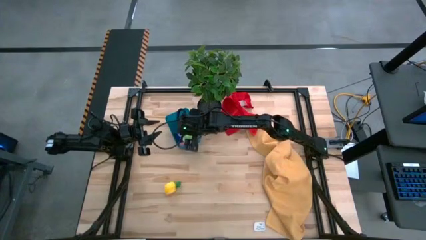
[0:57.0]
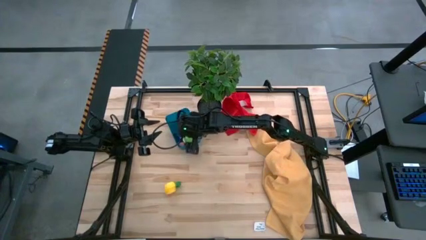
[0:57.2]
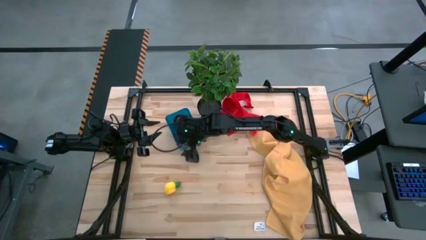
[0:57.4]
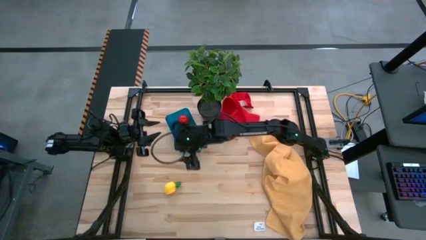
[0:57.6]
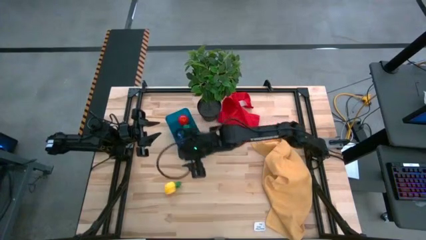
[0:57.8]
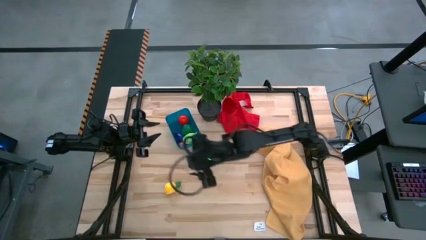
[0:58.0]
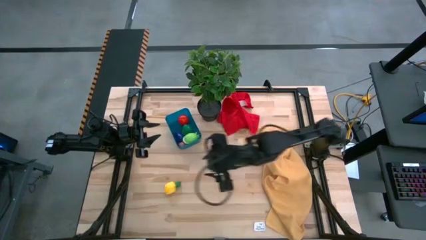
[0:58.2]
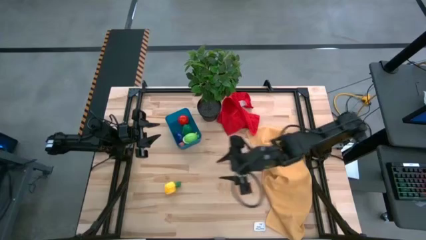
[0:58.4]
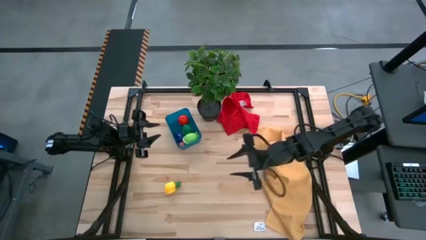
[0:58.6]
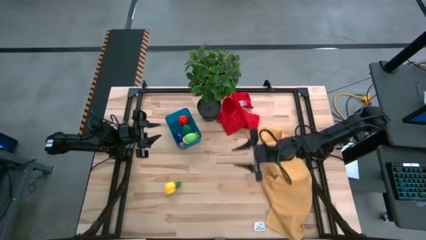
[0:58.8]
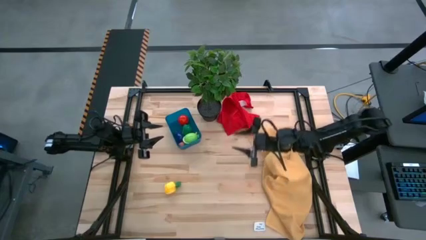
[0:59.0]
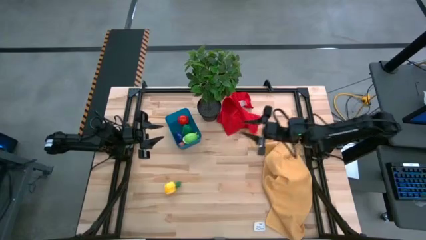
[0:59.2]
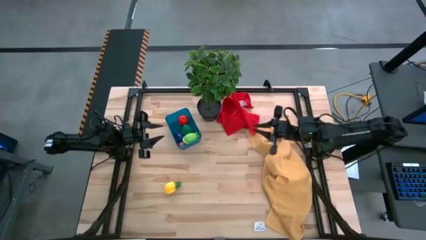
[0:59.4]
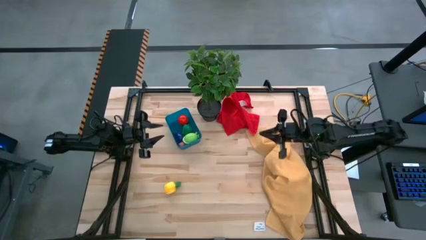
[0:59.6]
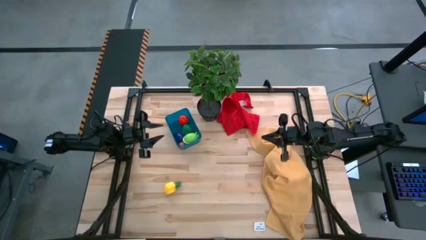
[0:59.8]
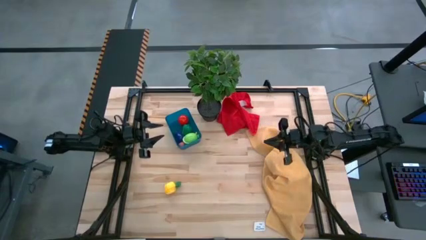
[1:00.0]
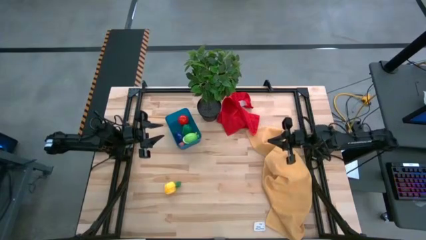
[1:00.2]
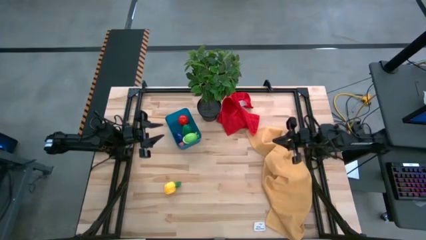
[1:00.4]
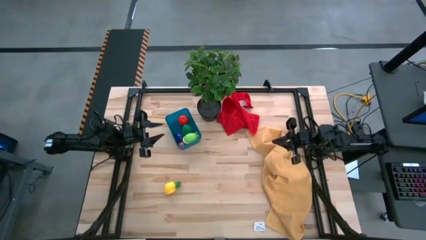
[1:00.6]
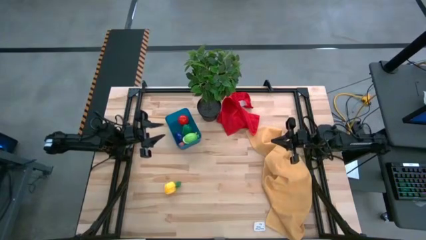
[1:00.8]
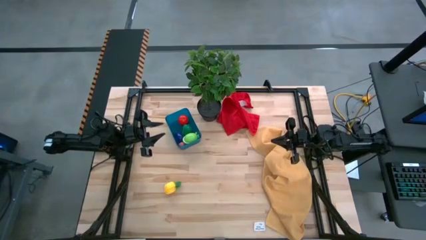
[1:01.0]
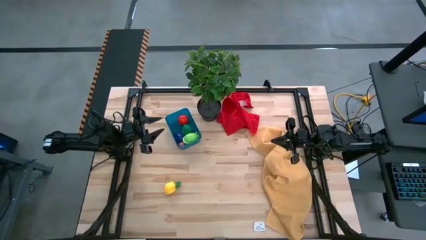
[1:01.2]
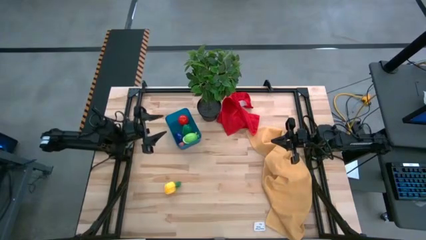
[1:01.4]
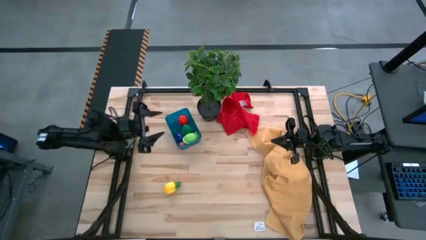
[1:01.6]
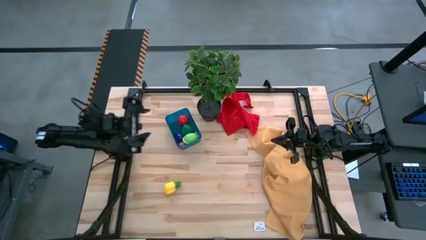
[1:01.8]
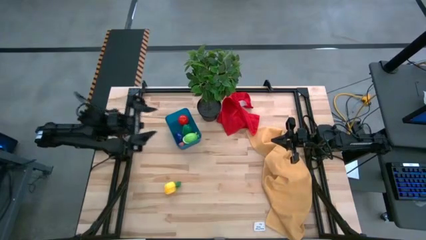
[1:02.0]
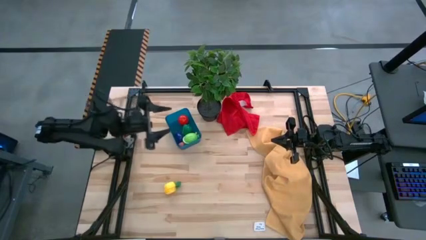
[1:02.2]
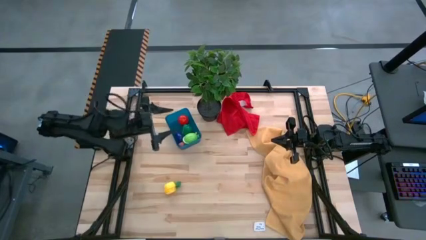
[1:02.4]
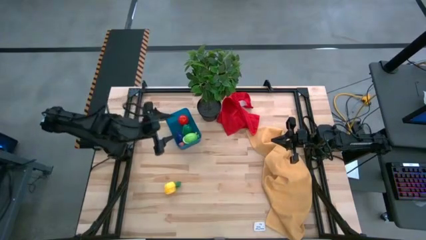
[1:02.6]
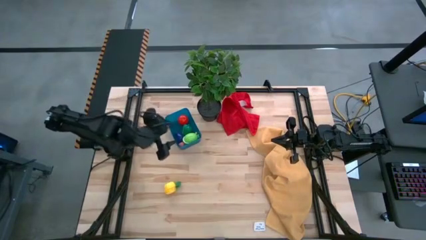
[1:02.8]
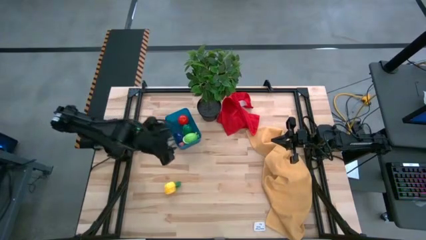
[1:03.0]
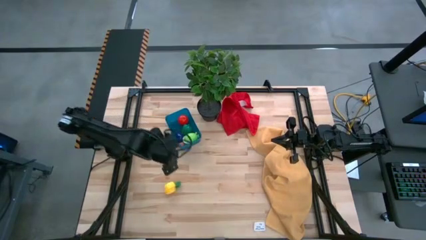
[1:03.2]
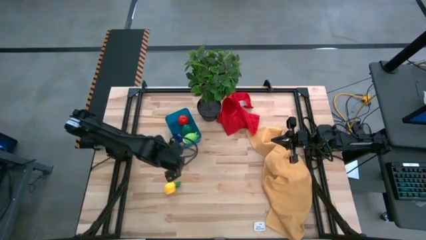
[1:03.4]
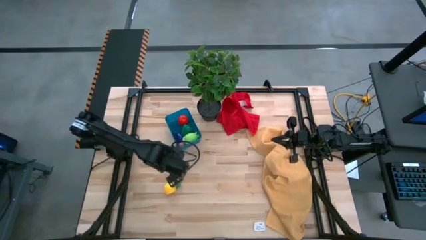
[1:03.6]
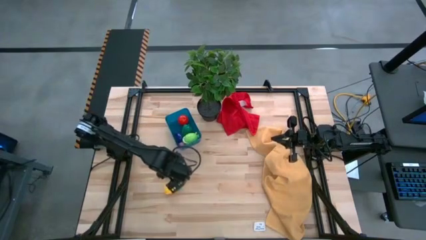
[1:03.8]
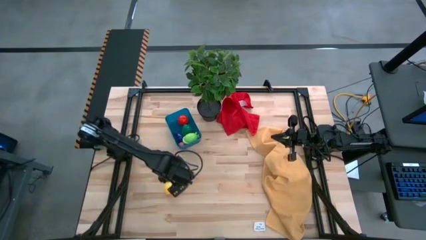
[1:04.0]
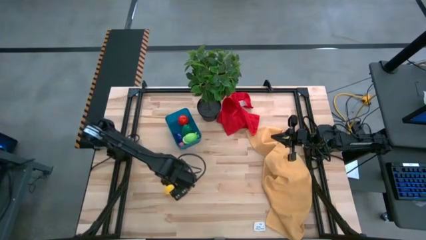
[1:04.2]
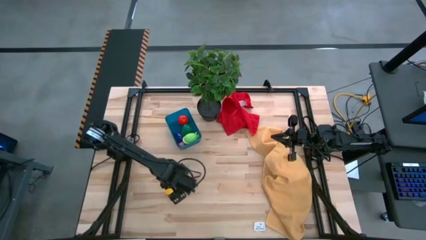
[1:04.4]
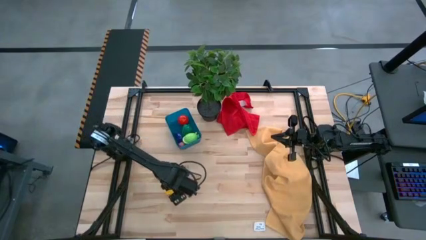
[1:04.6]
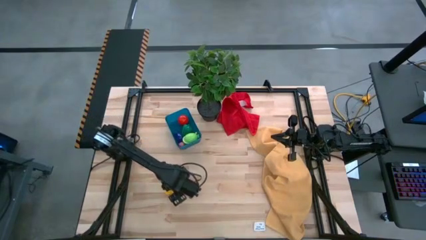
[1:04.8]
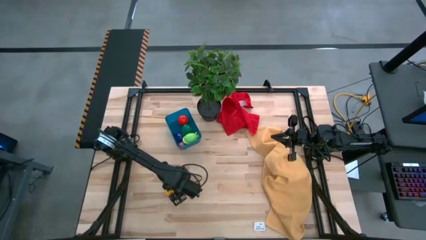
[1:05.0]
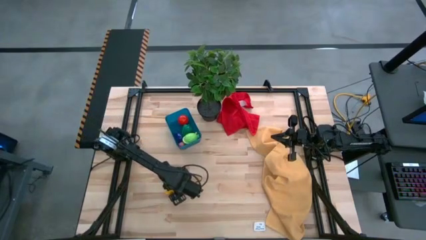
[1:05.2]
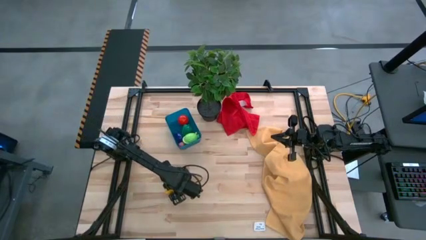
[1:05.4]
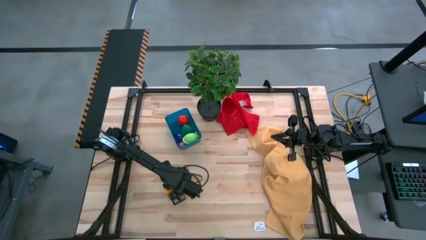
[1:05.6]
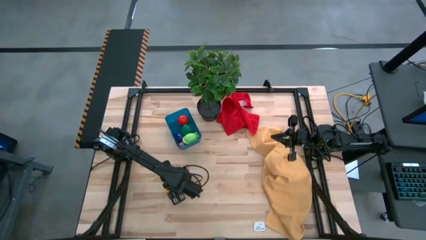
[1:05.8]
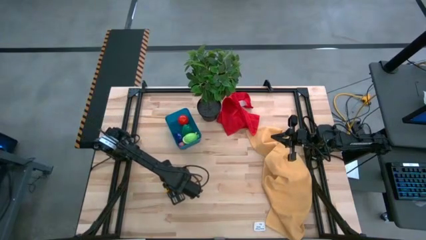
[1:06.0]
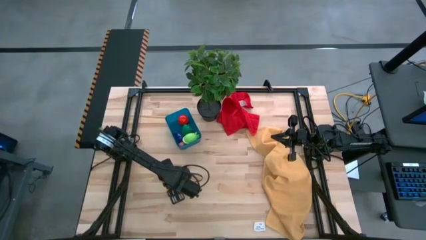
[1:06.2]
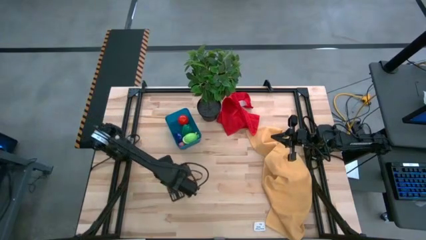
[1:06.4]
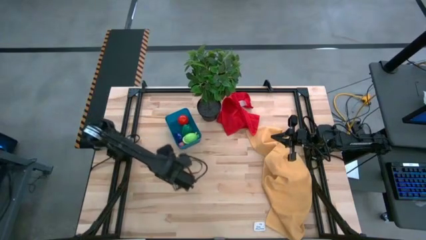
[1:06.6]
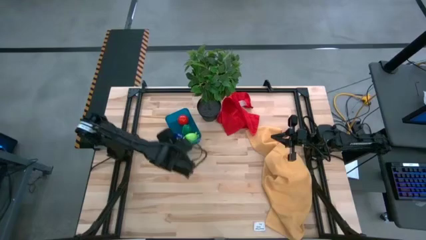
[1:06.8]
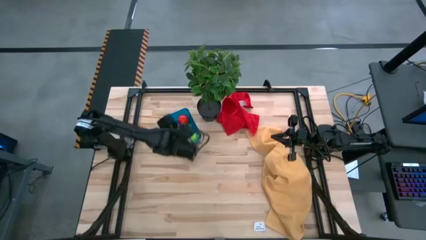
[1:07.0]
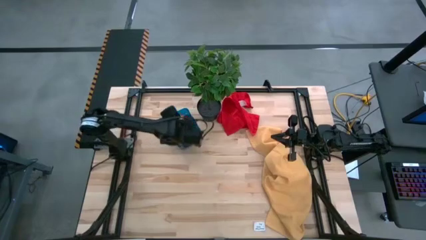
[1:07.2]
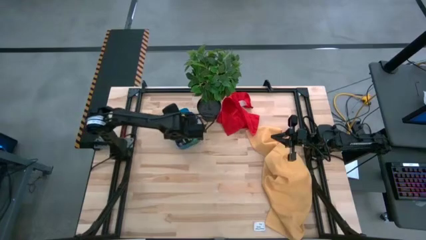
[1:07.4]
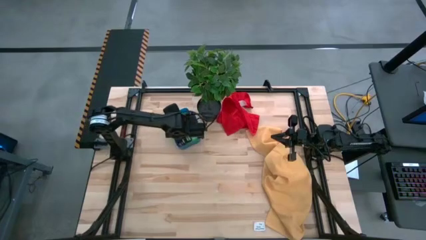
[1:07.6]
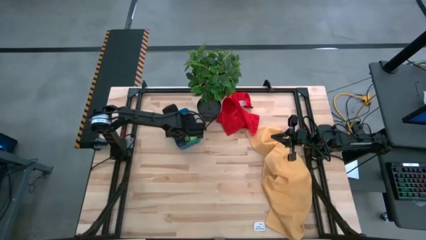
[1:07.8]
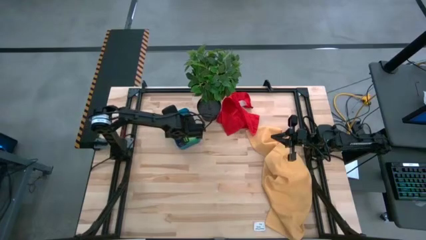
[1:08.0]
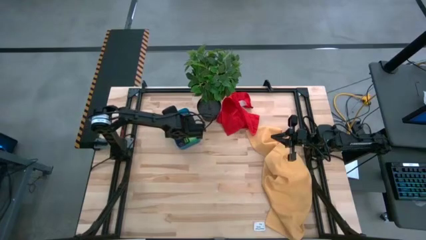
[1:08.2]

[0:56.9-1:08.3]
Task: Pick and placing Produce into tupperware
Put the yellow pineapple into the blue bin

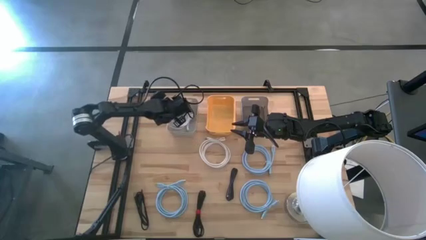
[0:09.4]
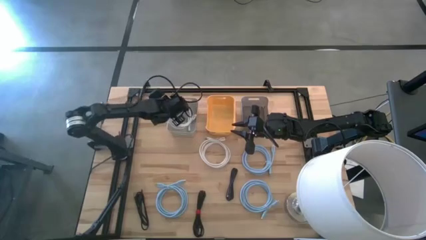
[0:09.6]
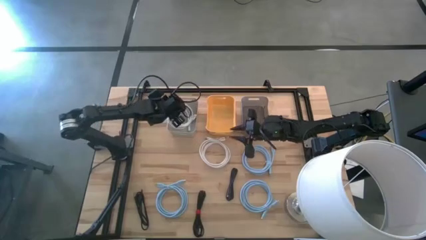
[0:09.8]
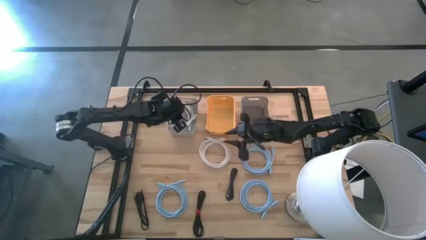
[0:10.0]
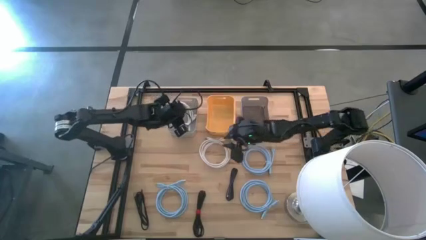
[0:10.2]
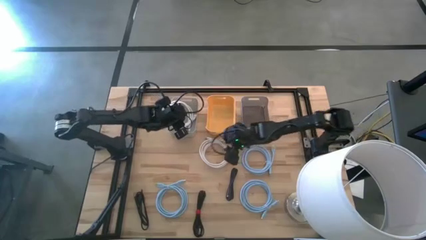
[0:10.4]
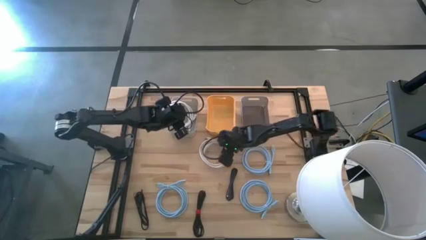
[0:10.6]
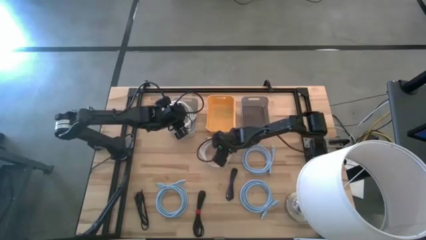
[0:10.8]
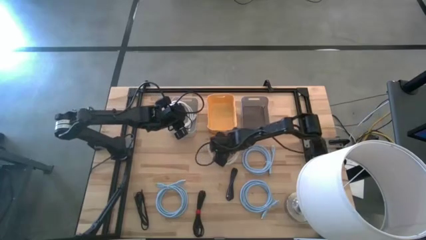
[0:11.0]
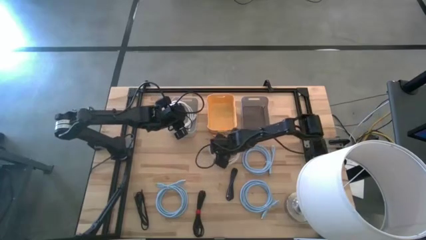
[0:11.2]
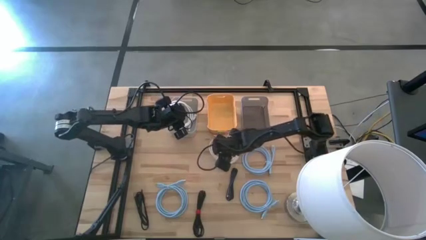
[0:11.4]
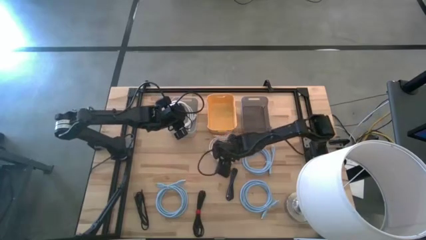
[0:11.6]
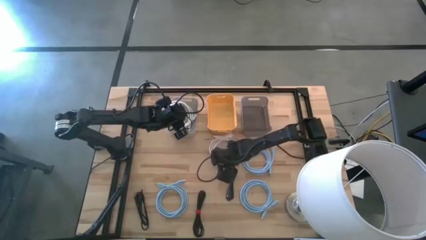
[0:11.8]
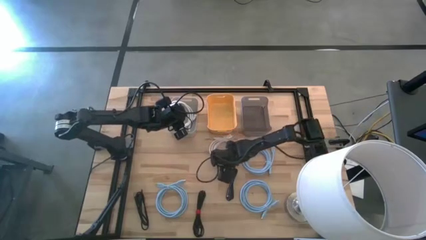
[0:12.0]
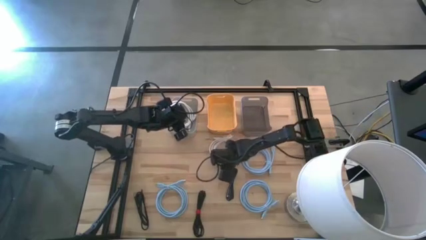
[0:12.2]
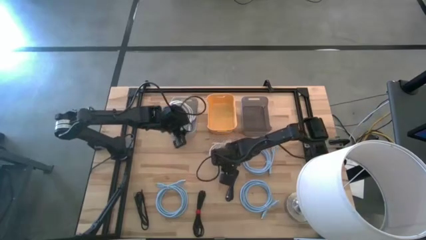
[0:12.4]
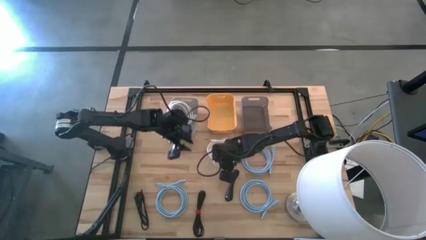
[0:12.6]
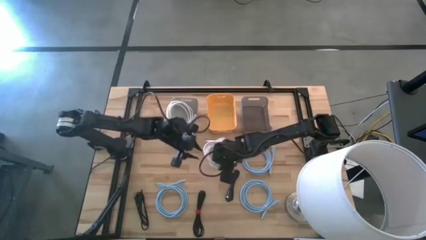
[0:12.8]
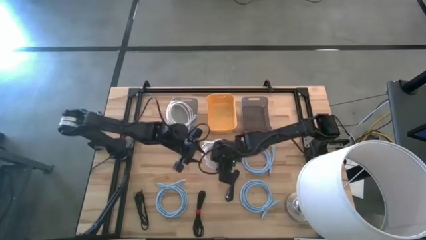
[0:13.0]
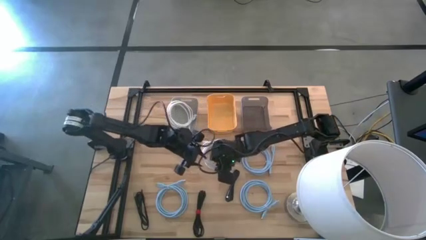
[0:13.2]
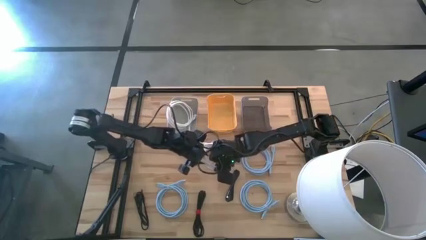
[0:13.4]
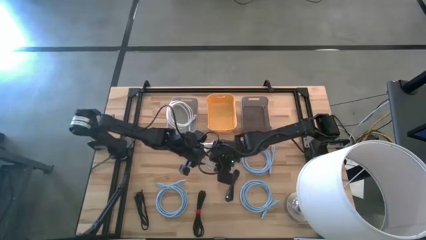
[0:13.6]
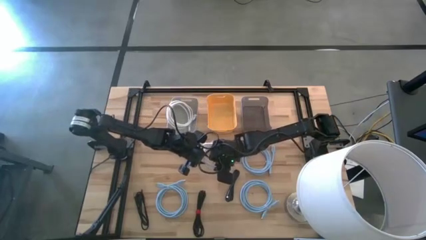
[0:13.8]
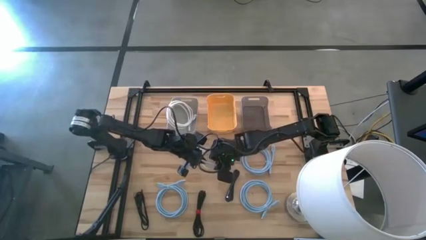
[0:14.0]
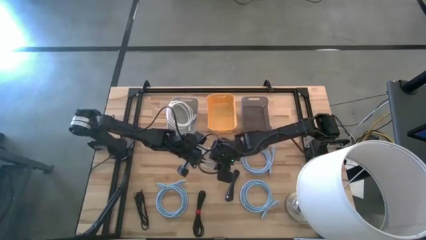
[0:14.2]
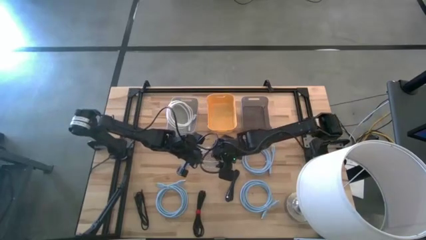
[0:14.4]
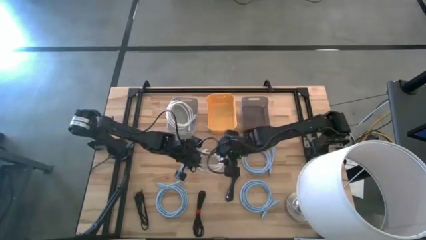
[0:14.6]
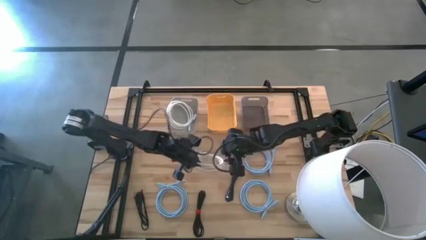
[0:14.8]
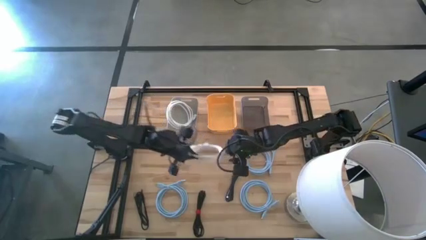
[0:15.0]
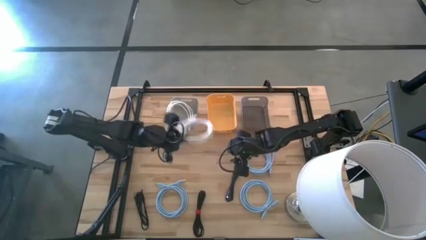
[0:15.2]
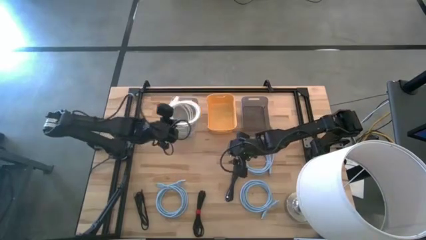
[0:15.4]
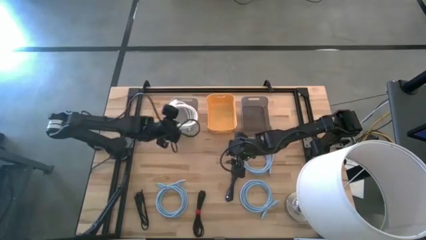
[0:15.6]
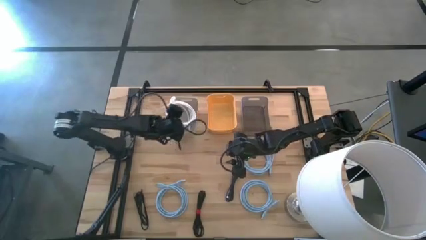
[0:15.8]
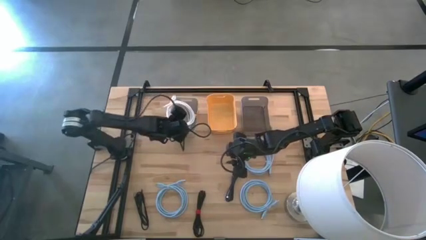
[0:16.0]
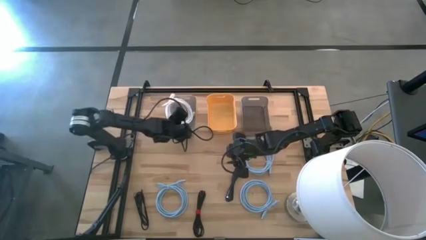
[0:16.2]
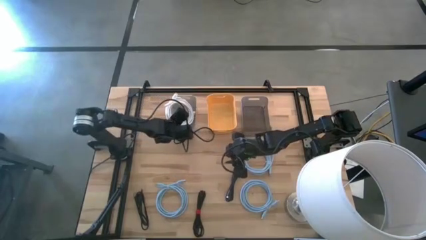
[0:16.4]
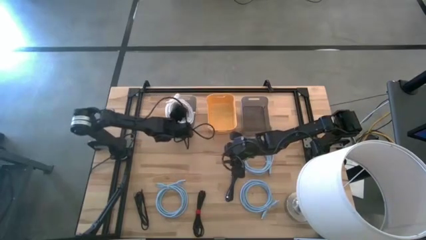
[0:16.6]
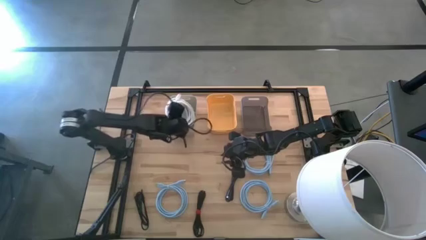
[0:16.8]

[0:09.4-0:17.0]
Task: Sort HDMI cables
Put the white HDMI cable into the gray bin
